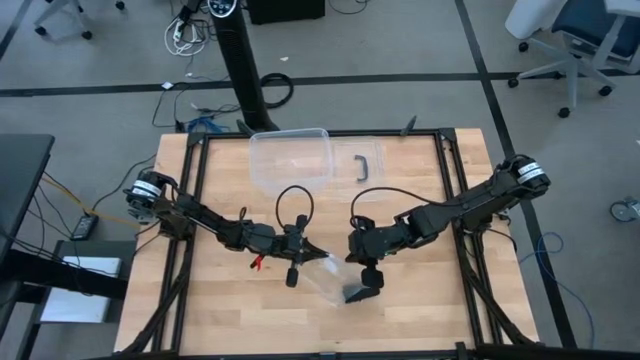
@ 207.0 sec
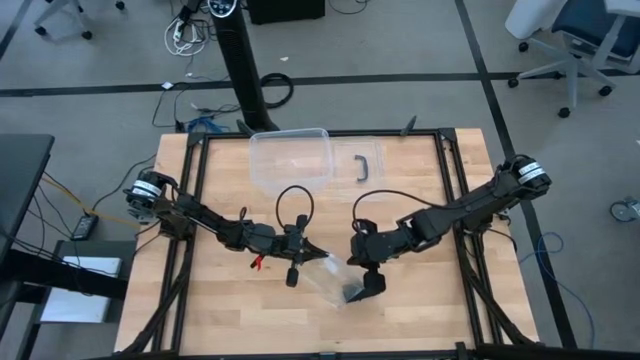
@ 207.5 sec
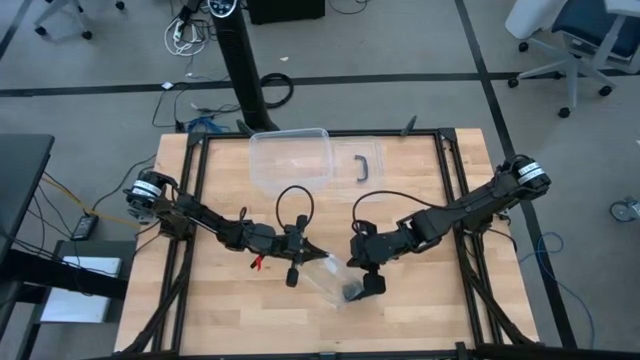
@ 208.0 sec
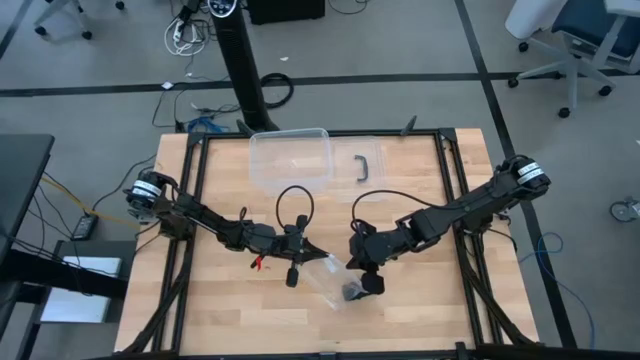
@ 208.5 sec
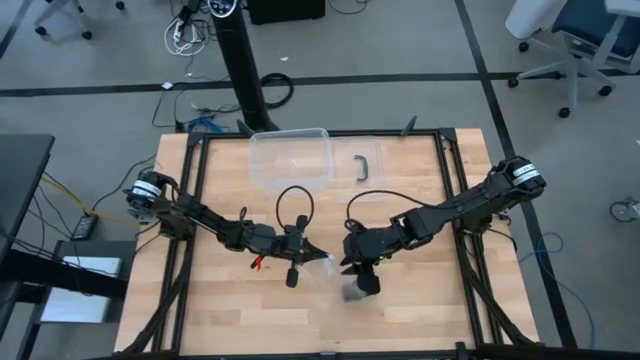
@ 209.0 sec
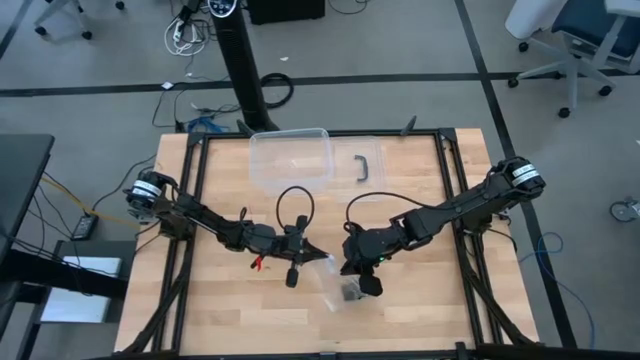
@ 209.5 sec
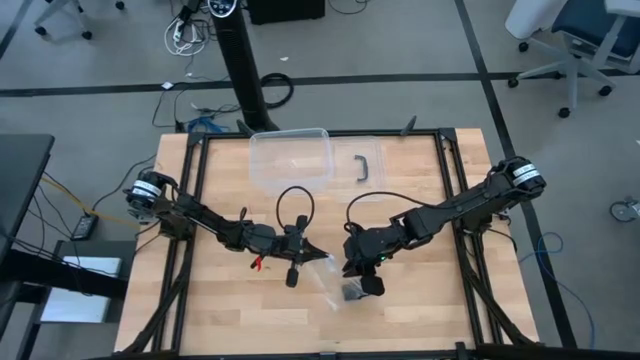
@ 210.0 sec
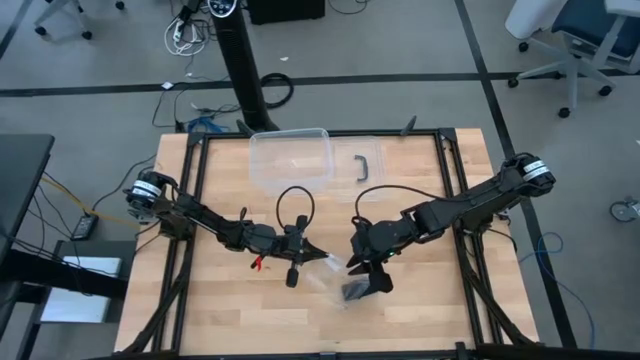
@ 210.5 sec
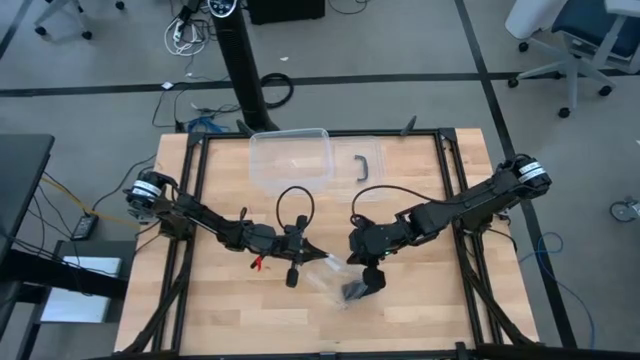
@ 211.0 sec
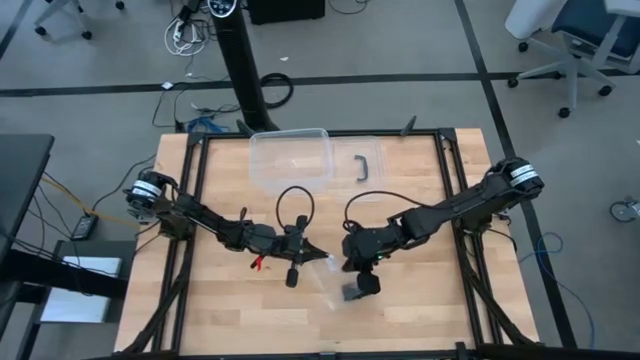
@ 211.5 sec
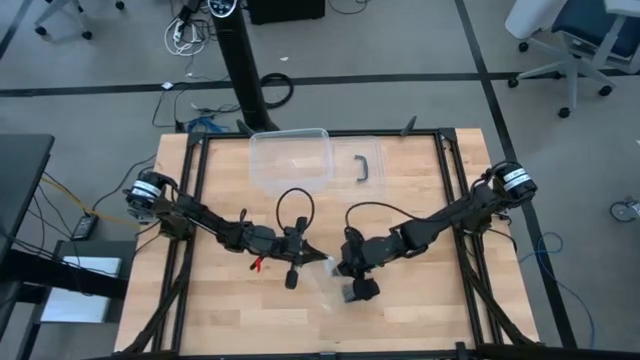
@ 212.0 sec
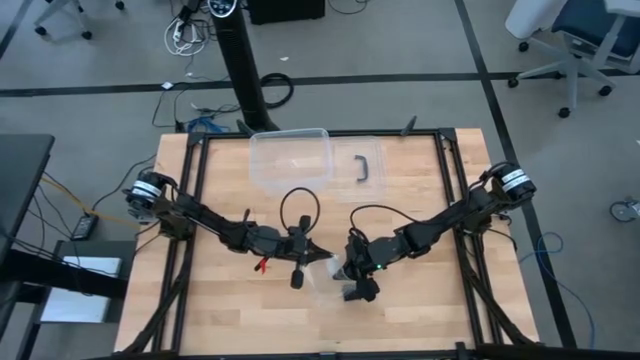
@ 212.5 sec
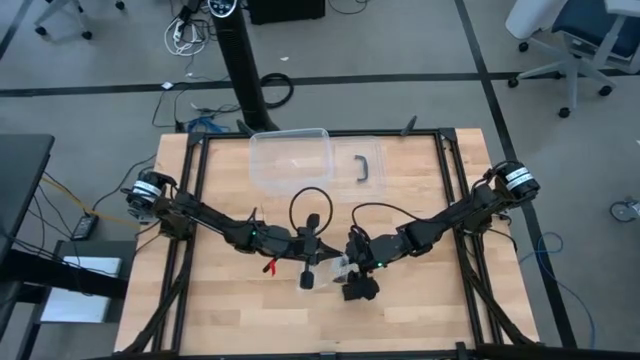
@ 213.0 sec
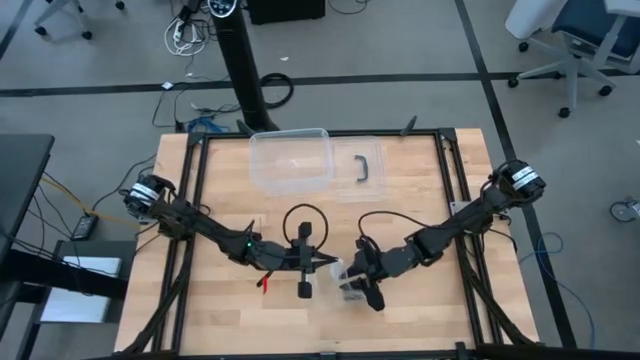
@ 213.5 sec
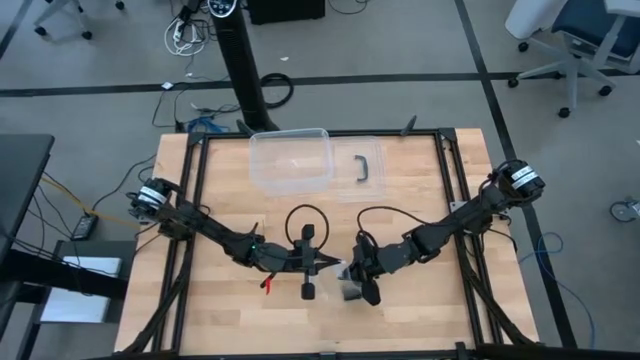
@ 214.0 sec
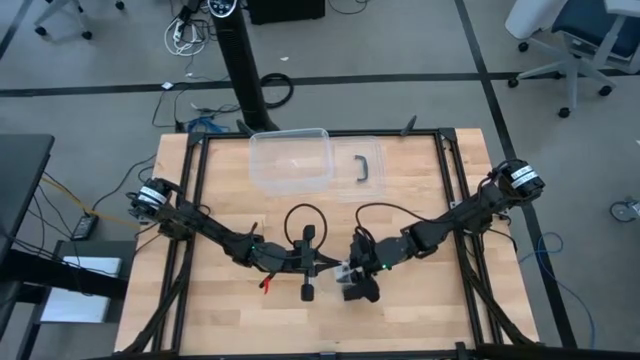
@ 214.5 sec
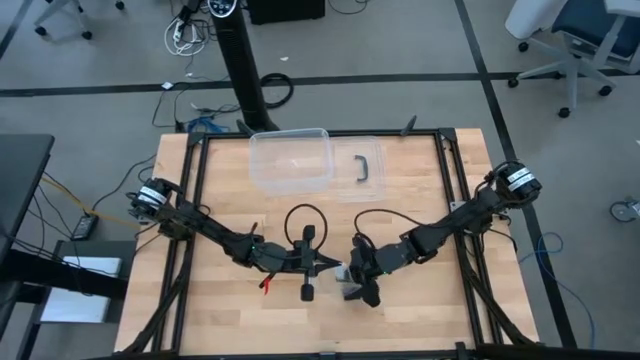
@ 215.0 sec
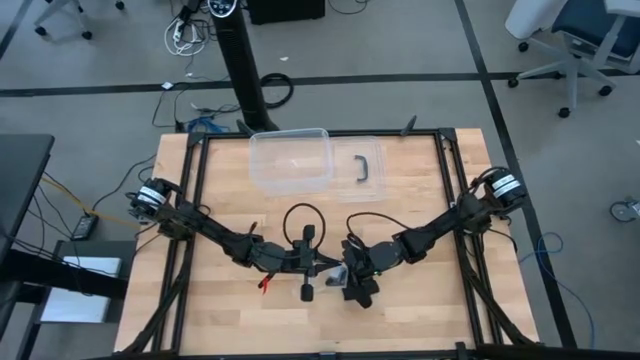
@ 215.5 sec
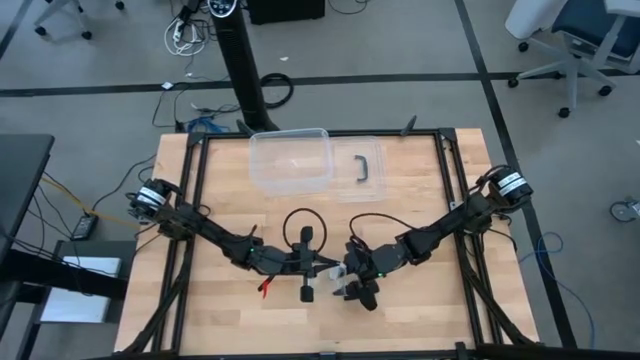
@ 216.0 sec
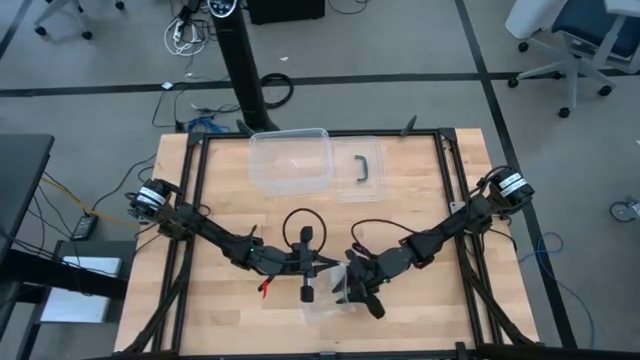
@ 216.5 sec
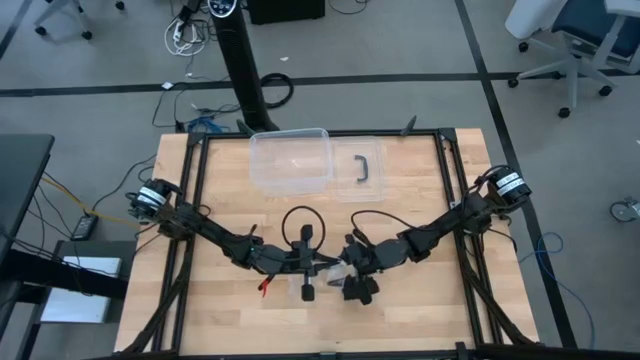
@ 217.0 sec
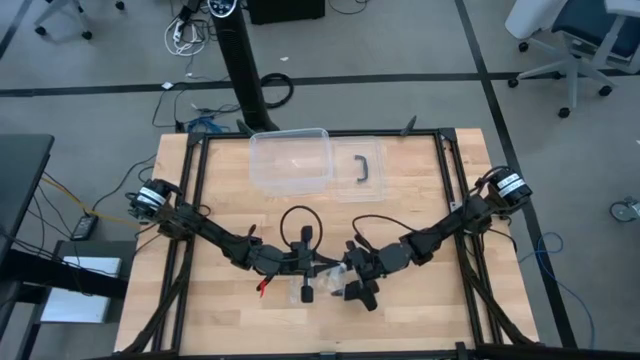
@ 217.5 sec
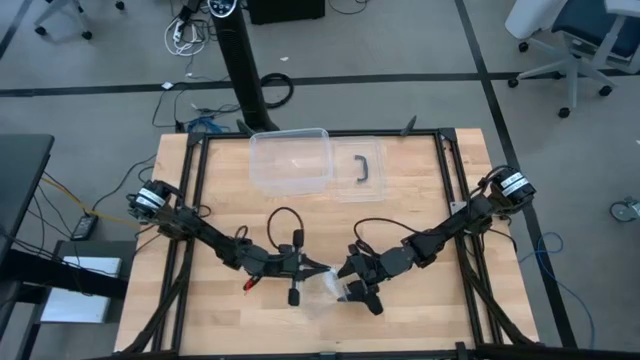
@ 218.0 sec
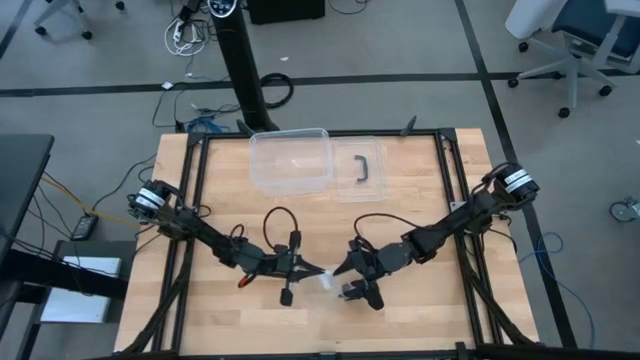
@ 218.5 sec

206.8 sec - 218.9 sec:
Task: Roll bandage
Open the transparent zip bag

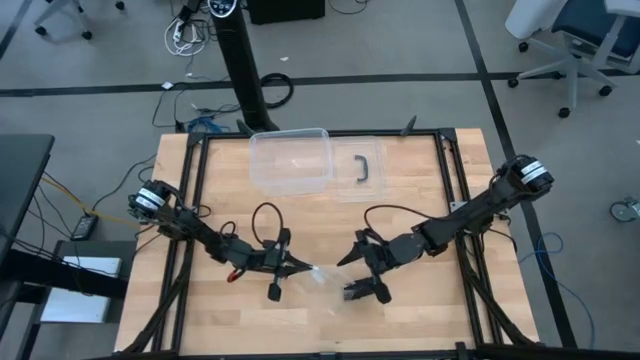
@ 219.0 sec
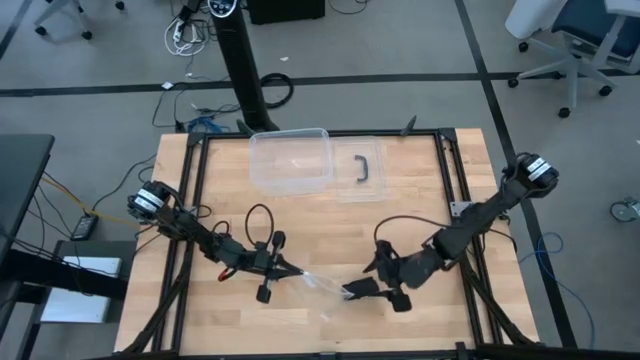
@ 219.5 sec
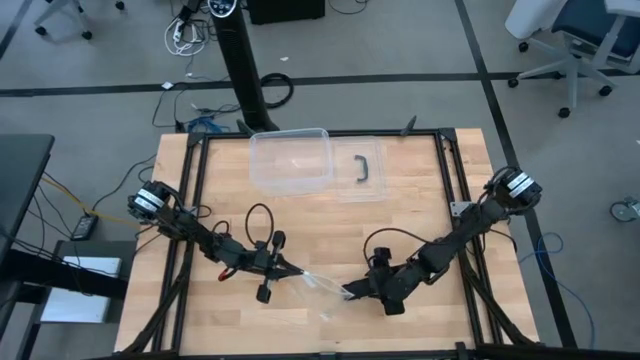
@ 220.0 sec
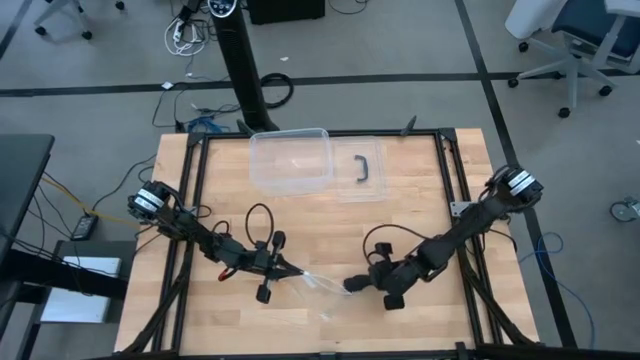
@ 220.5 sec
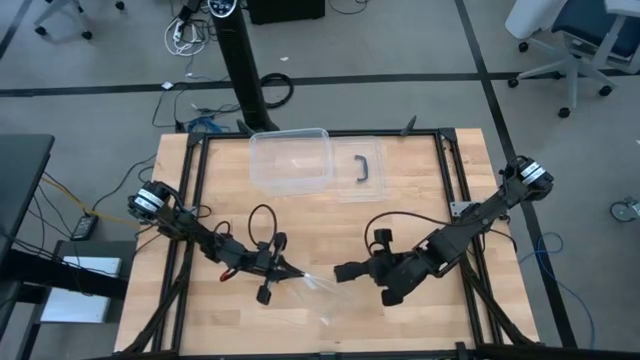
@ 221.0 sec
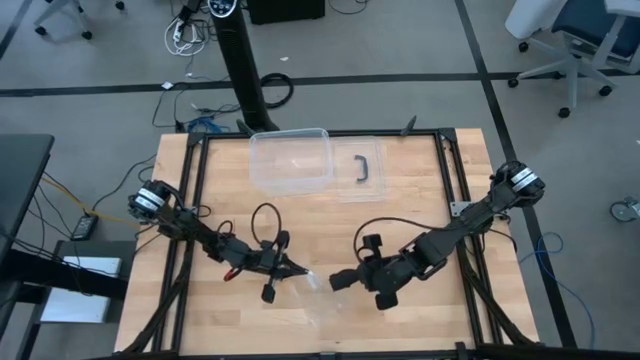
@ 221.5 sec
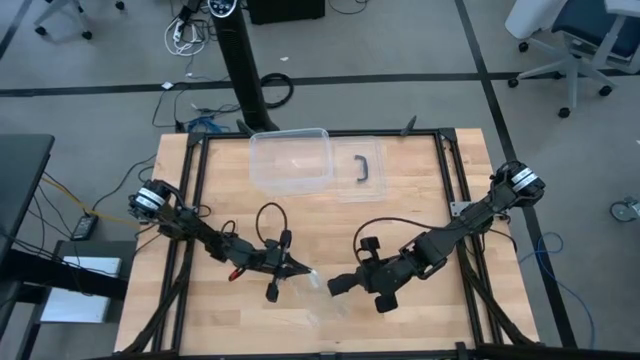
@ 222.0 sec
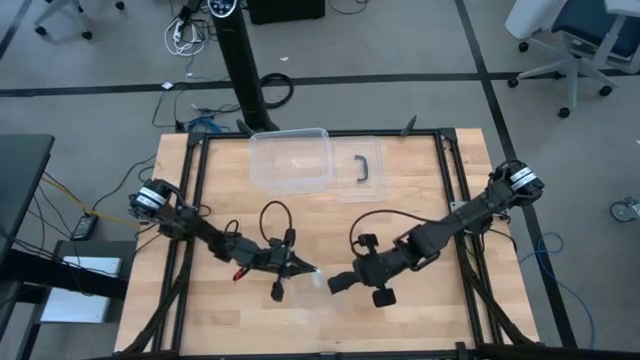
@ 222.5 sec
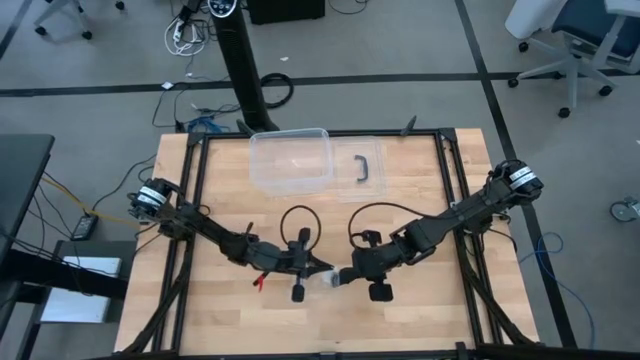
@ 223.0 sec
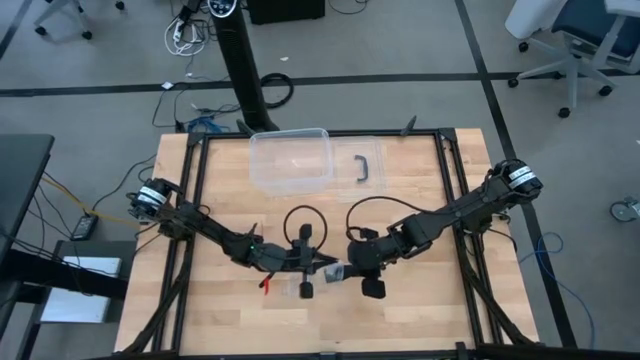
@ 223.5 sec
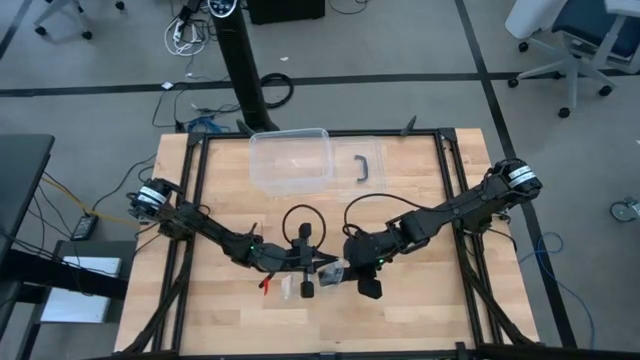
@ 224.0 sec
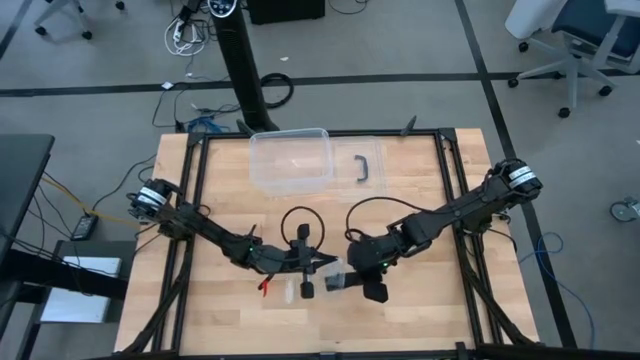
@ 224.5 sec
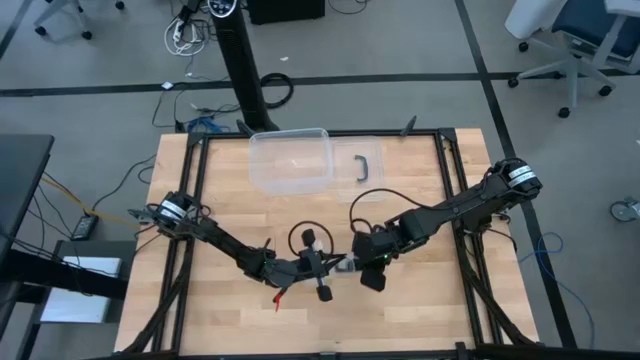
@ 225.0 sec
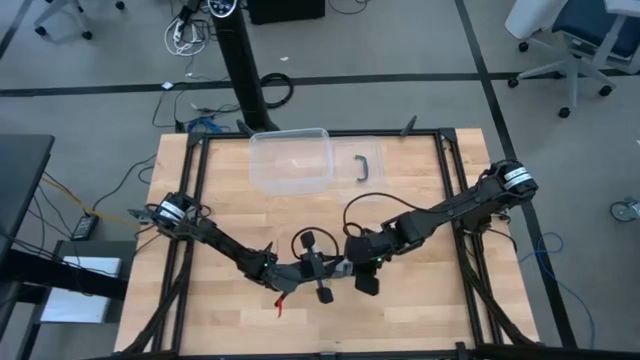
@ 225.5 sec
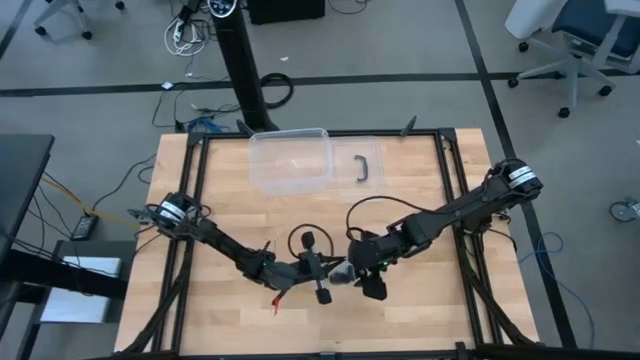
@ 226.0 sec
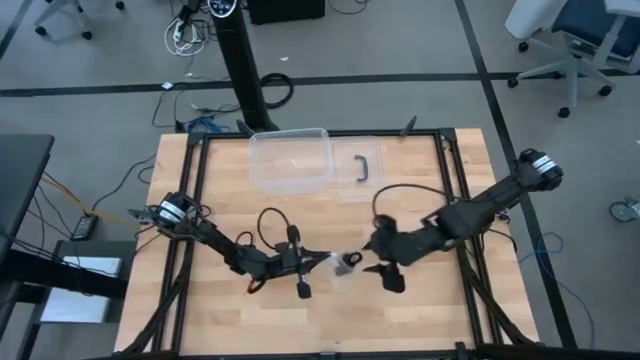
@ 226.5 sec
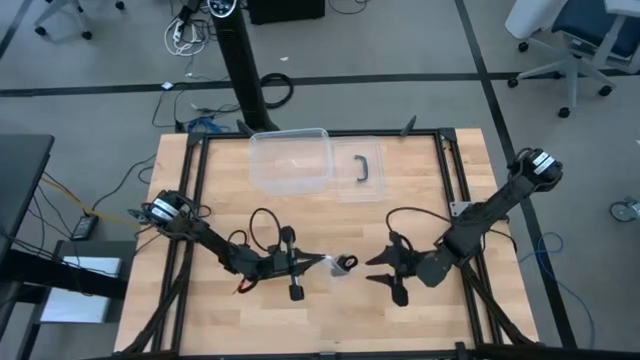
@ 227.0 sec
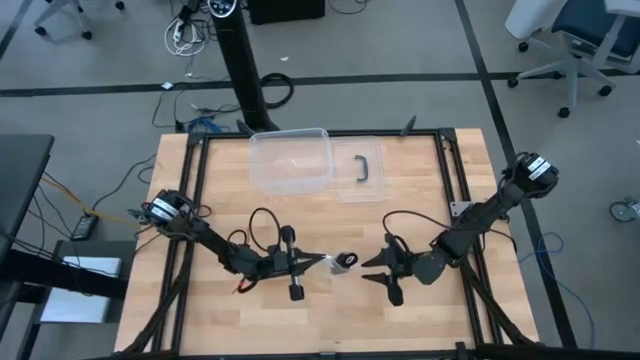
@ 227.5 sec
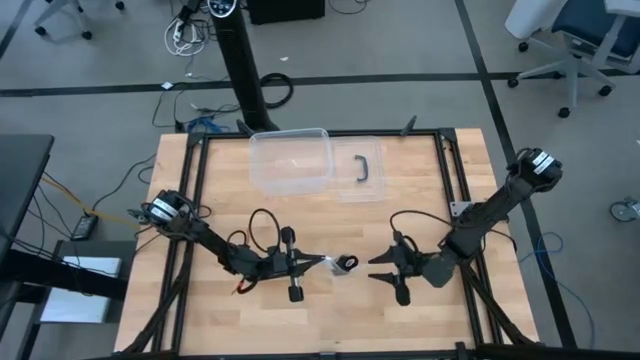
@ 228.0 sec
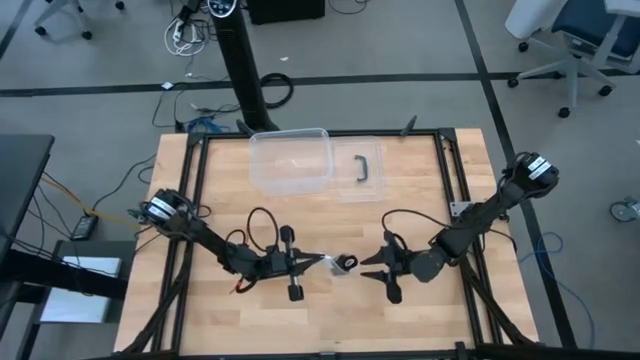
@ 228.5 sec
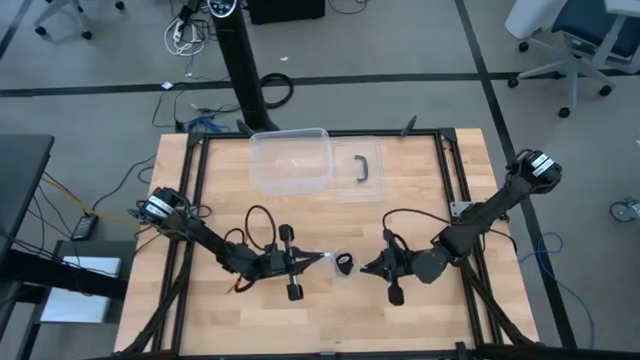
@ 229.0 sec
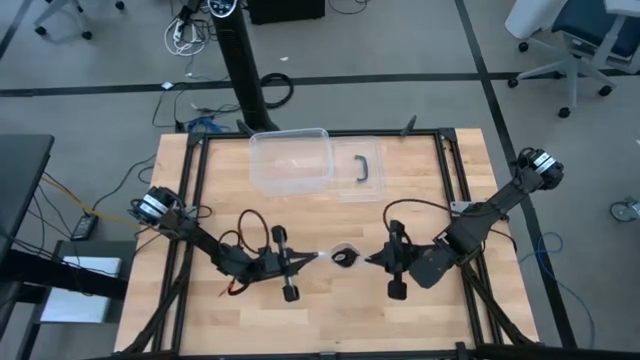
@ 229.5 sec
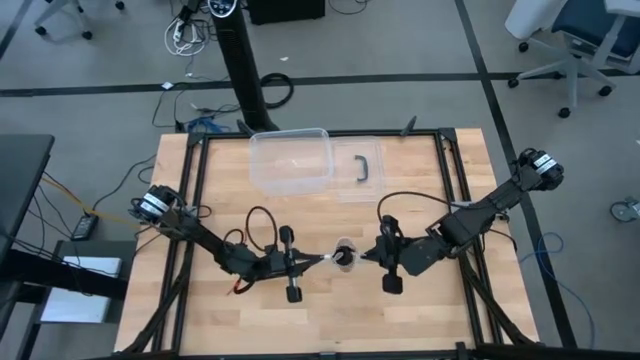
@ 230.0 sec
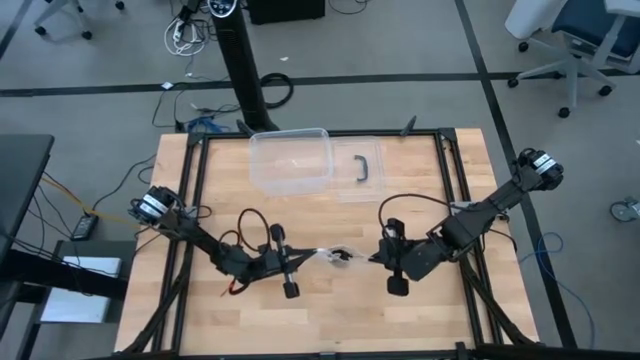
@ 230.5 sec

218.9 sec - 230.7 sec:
Put the rolled black bandage into the transparent zip bag
